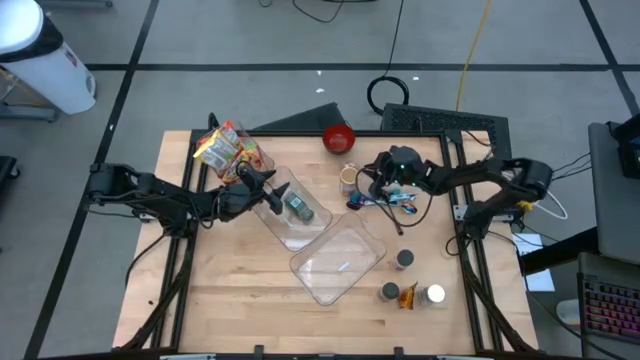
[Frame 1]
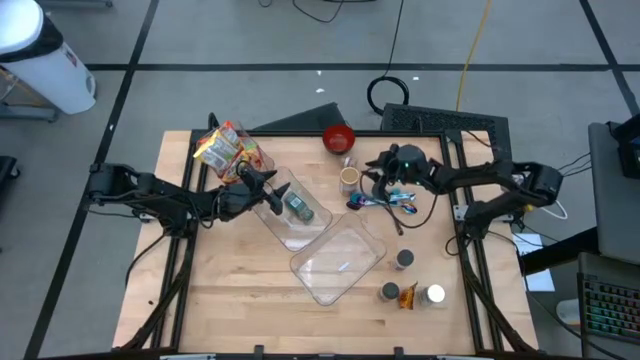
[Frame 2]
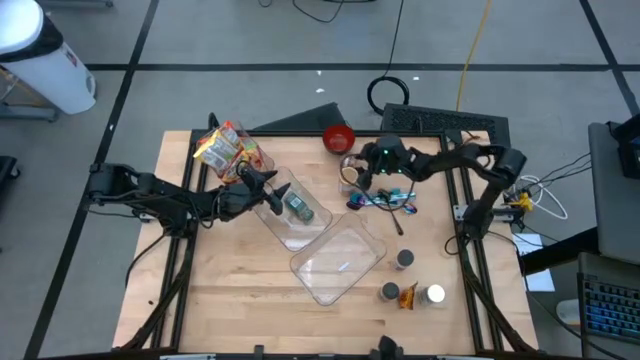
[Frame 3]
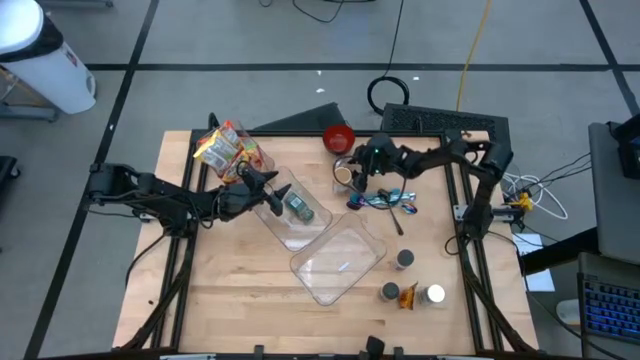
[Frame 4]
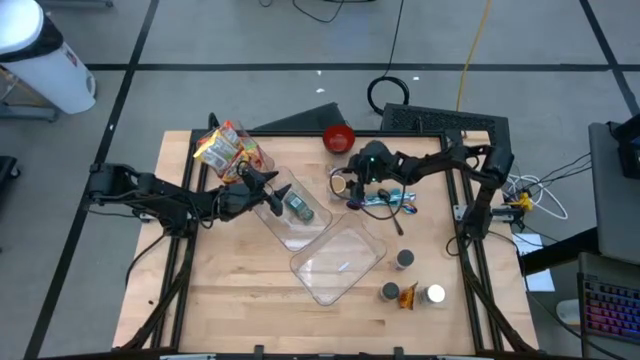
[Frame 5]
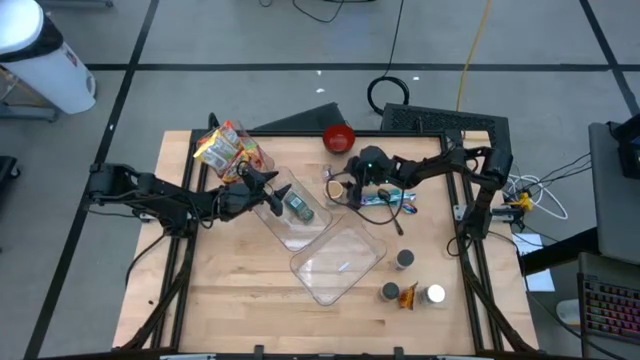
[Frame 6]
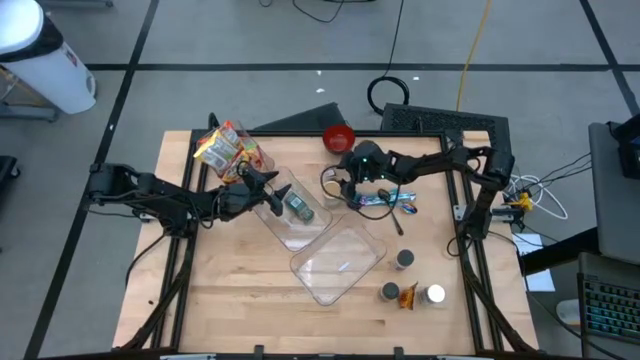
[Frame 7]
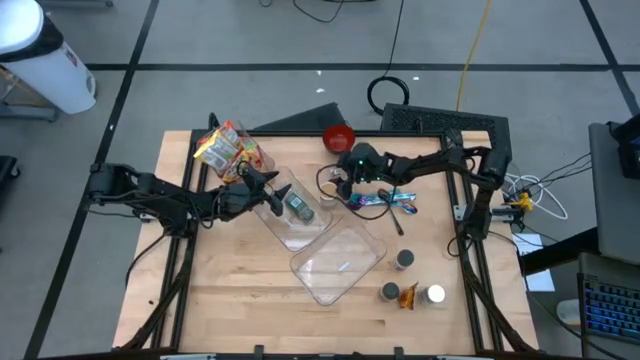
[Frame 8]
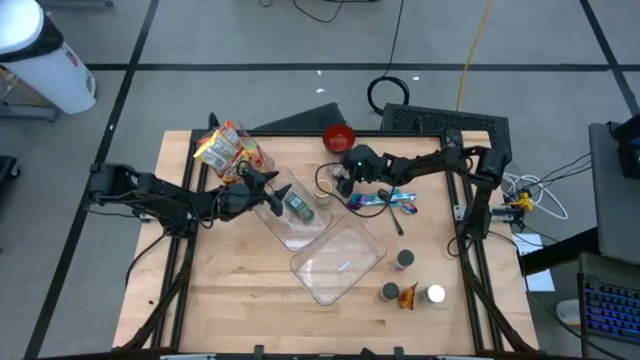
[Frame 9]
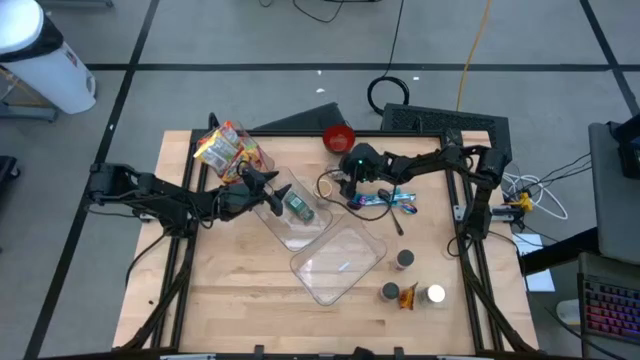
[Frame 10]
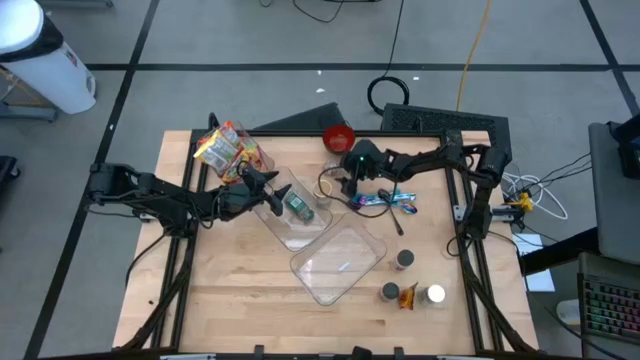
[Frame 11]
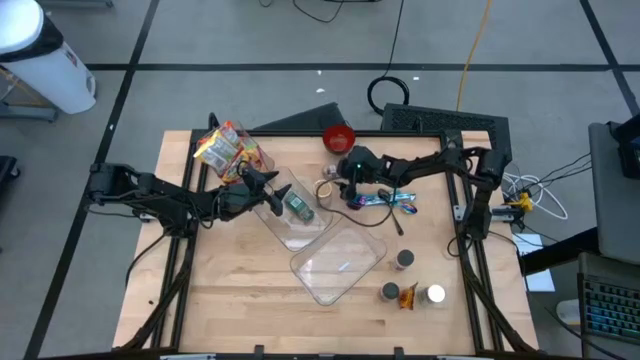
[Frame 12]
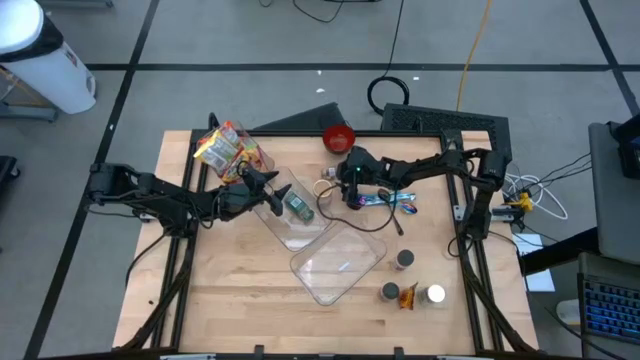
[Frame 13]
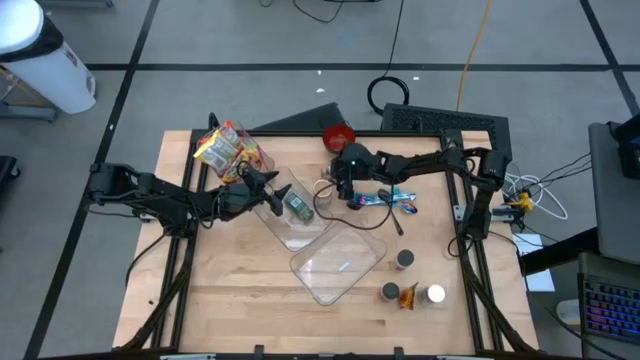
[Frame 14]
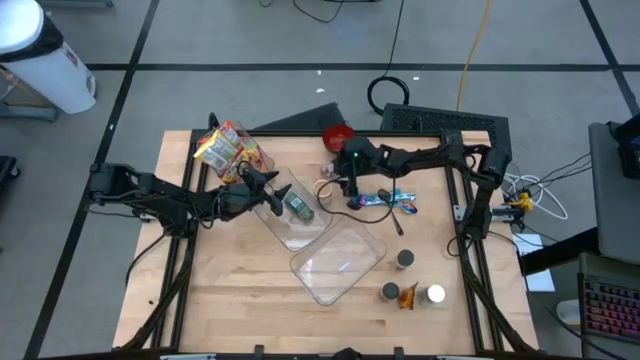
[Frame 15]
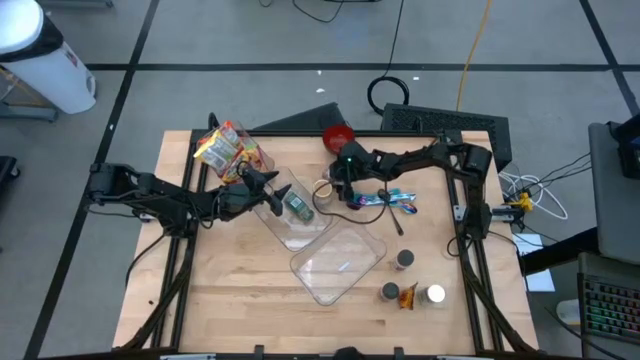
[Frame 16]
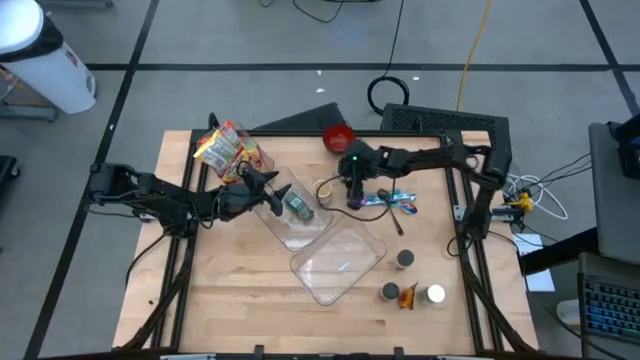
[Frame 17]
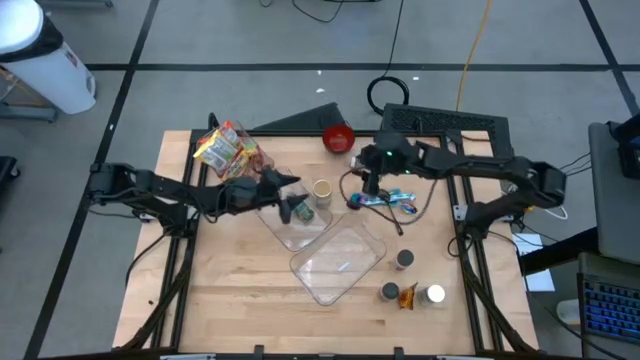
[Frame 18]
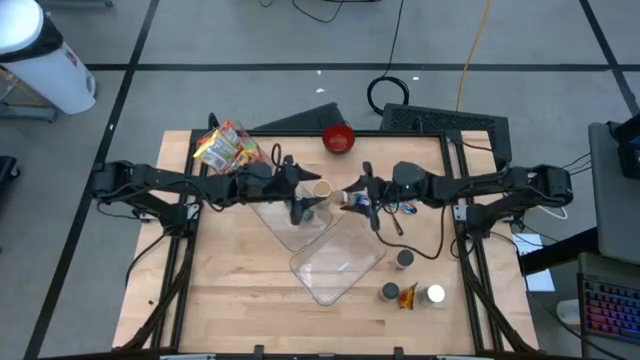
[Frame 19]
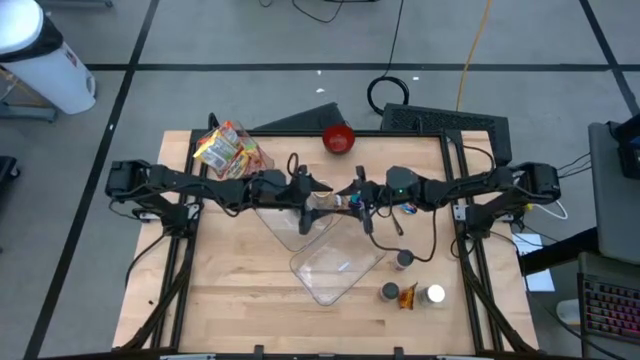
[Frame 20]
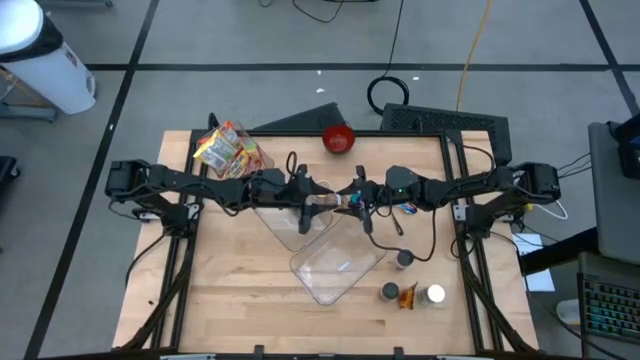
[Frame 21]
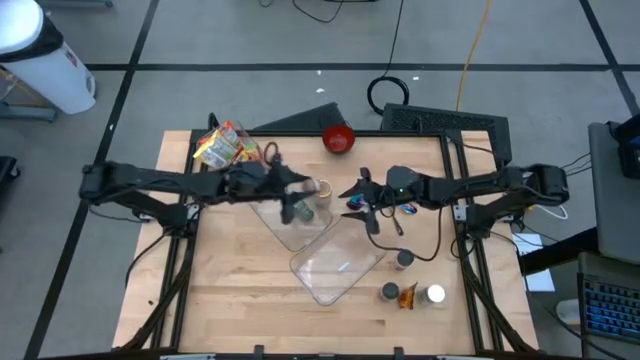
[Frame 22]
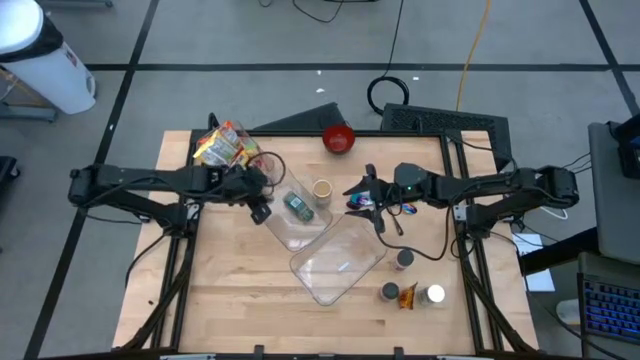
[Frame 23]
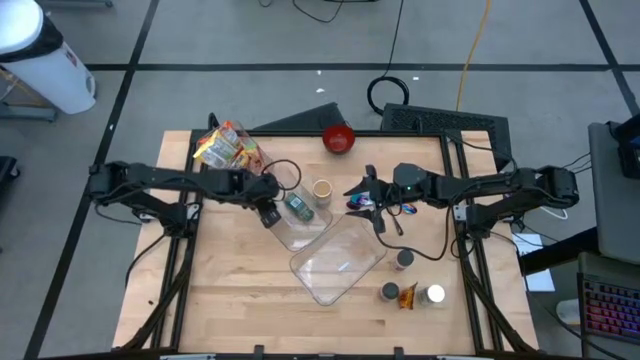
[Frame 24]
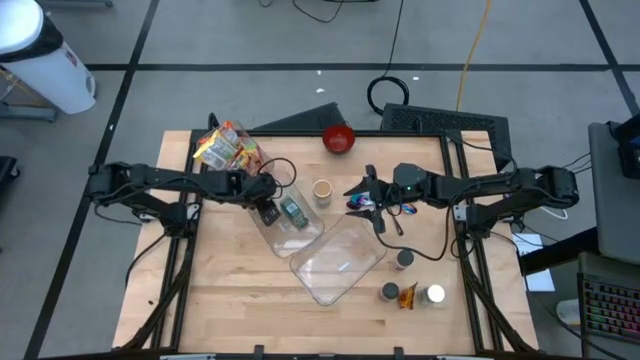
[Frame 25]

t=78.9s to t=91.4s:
Task: Pick & Place Food Item
Put the brown seasoning bottle into the middle transparent bin

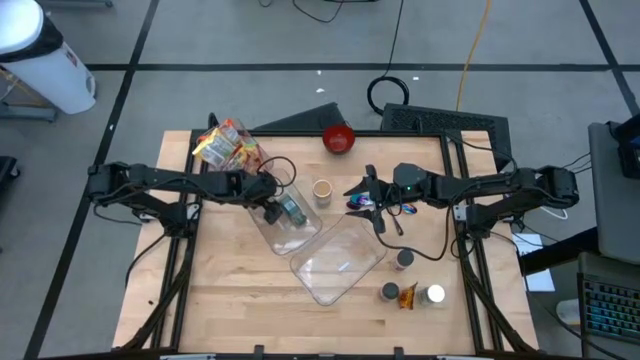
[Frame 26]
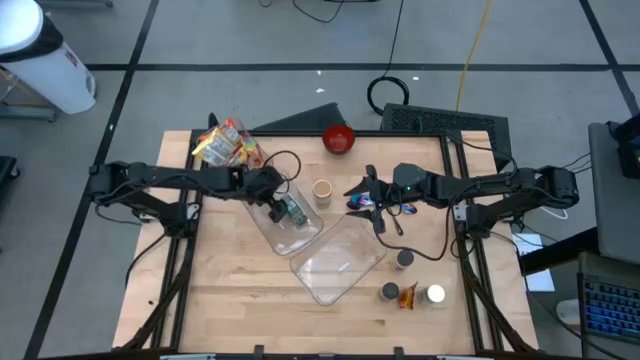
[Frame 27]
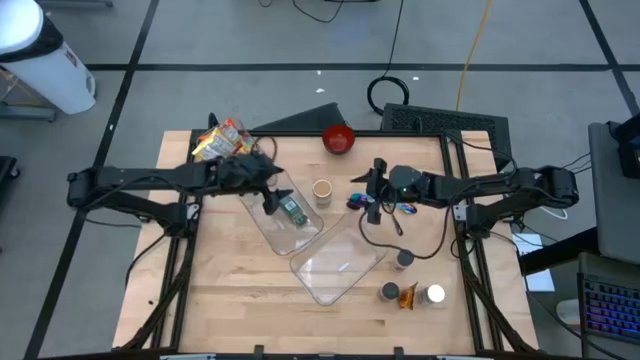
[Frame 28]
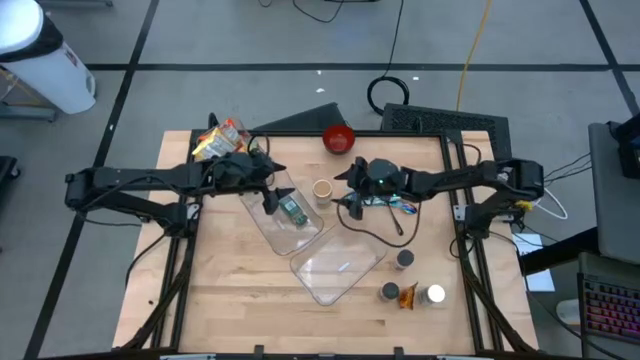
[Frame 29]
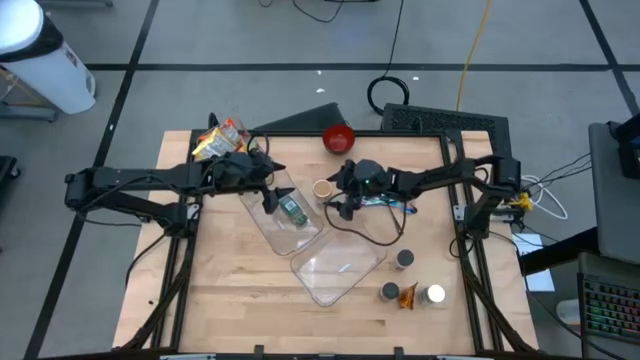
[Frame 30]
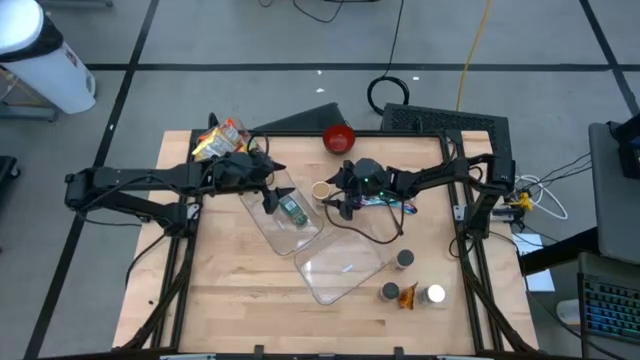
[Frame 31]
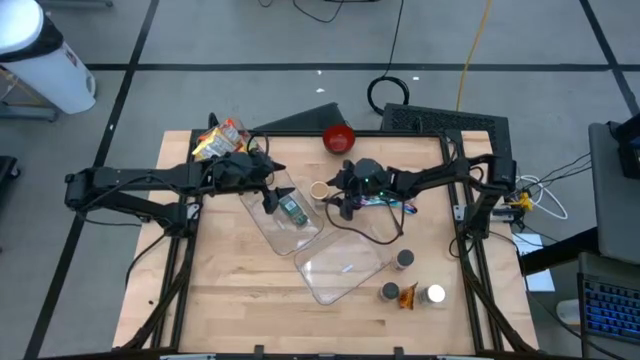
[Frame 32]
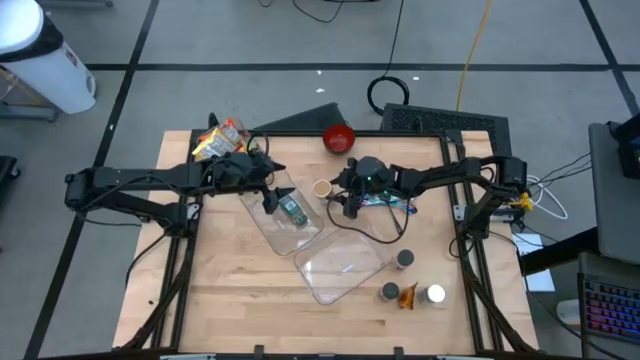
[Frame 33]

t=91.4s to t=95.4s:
Put the gold seasoning bottle into the middle transparent bin

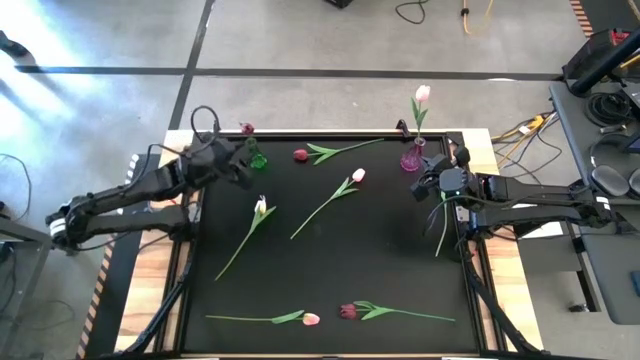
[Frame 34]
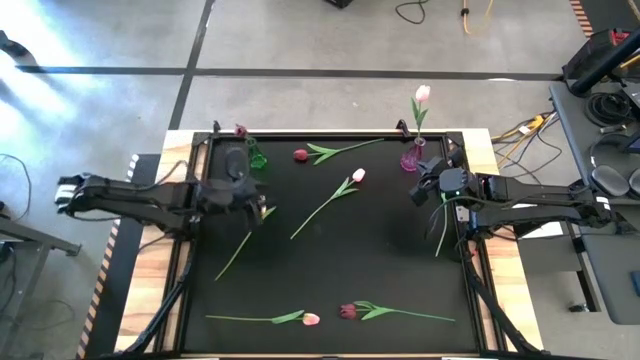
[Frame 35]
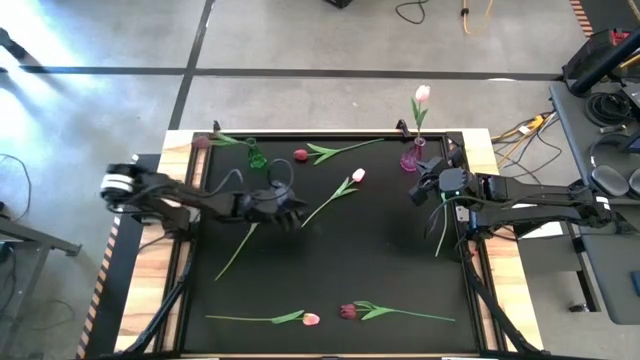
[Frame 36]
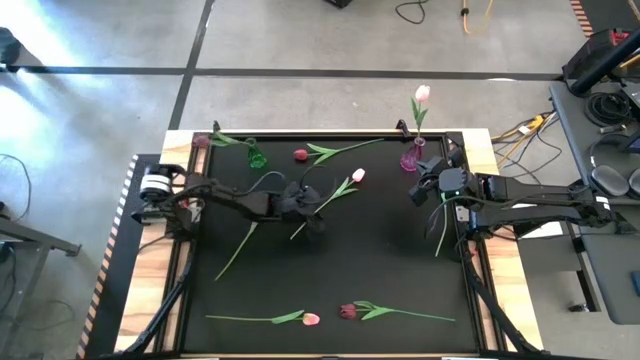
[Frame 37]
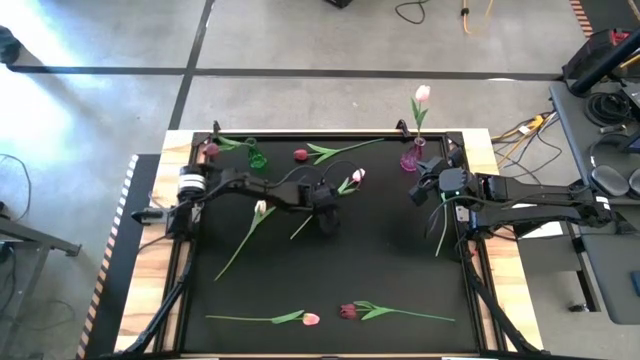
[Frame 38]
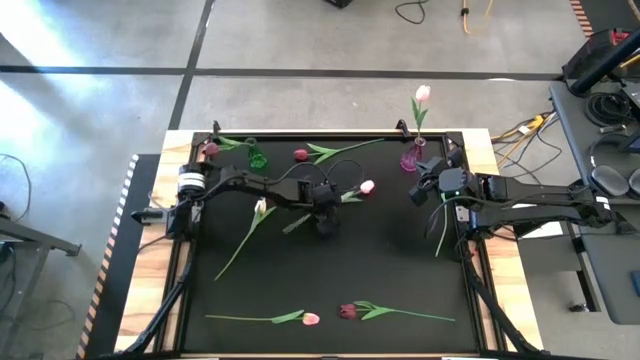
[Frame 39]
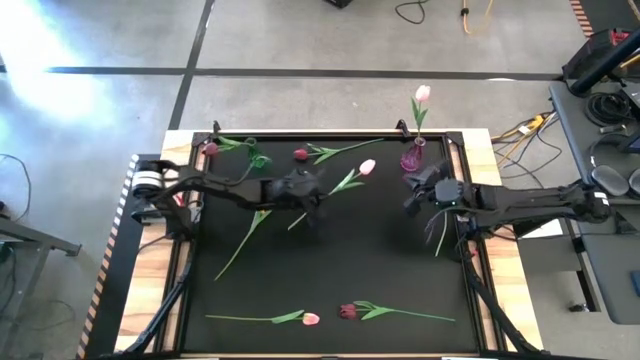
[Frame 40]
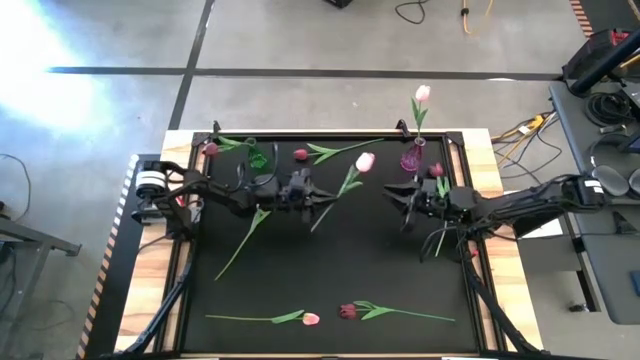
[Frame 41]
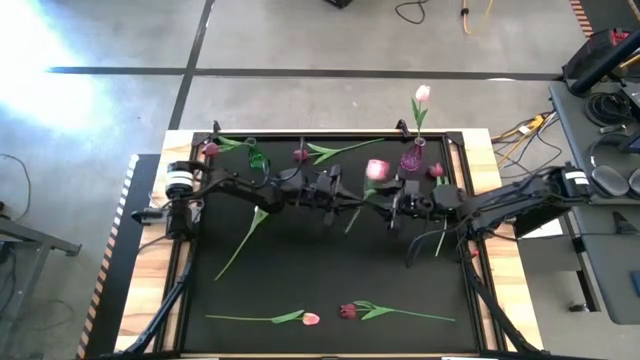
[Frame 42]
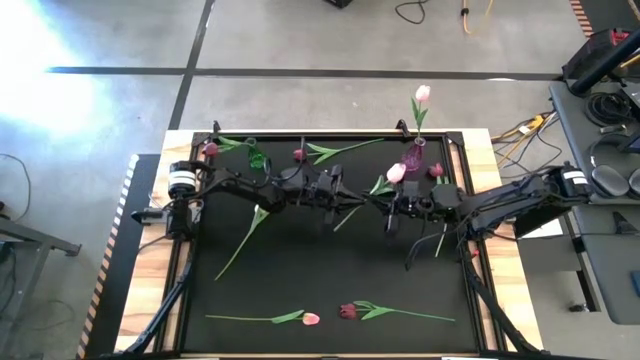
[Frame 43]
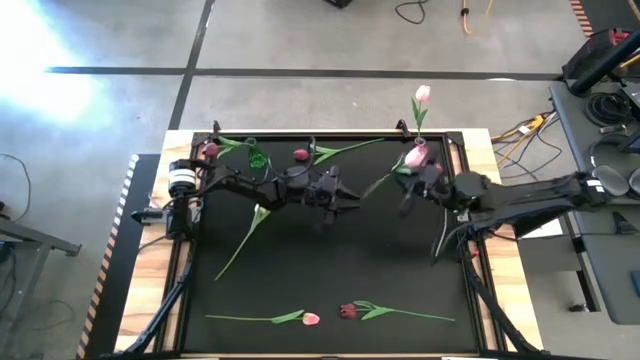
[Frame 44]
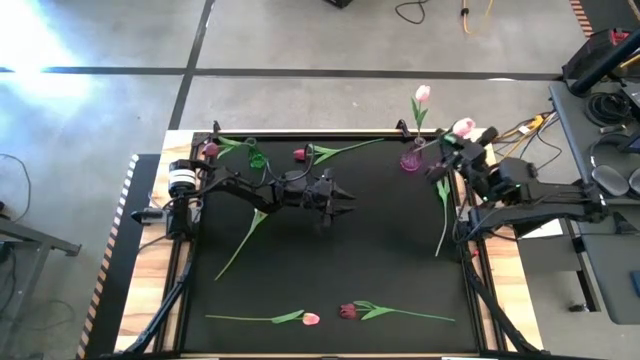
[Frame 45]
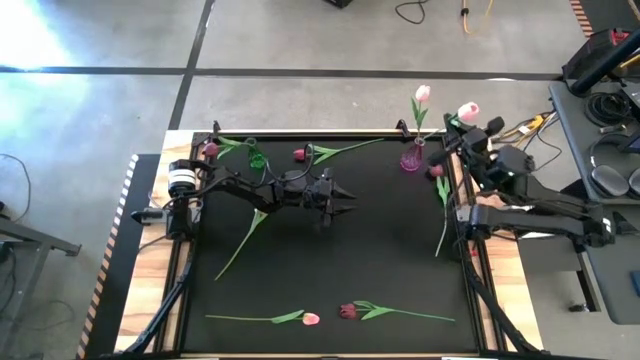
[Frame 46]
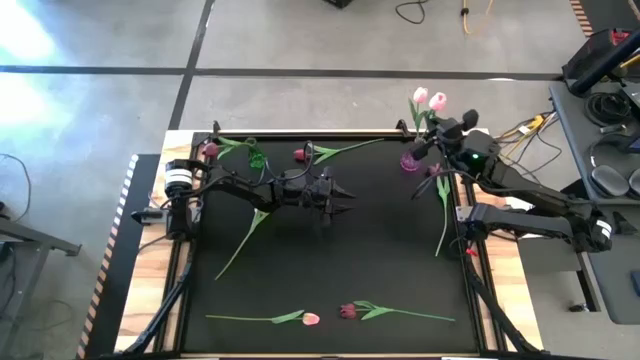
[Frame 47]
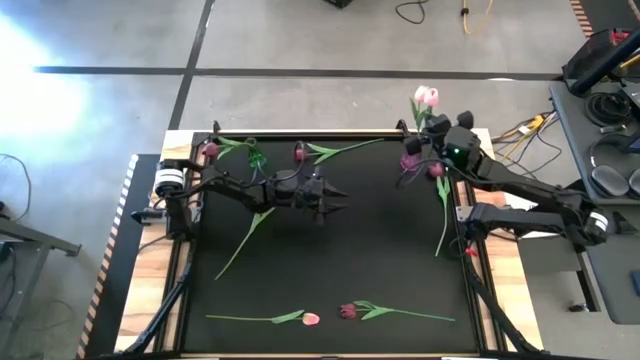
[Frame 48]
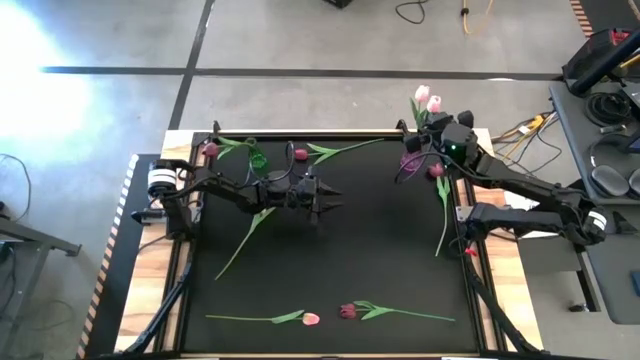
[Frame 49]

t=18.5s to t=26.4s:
Task: Sort flowers into vase by color
Put the pink flower into the violet vase
